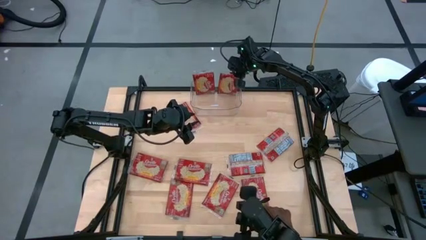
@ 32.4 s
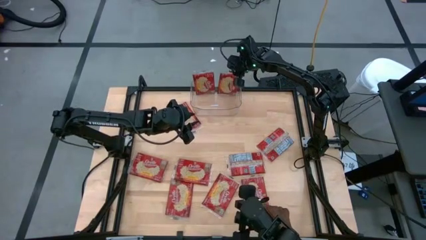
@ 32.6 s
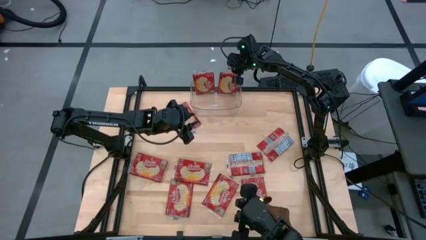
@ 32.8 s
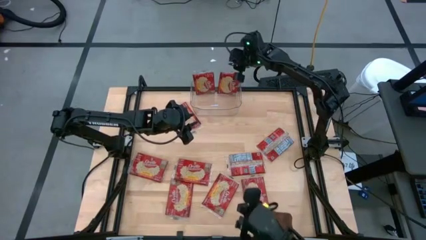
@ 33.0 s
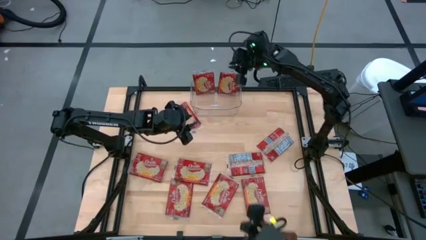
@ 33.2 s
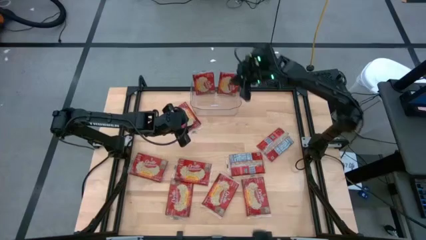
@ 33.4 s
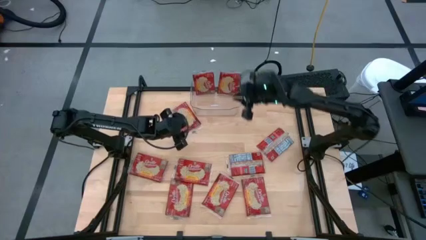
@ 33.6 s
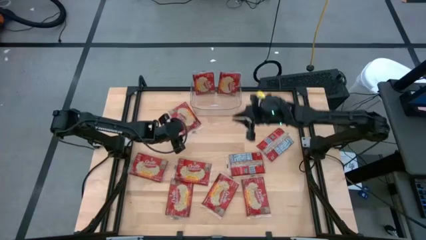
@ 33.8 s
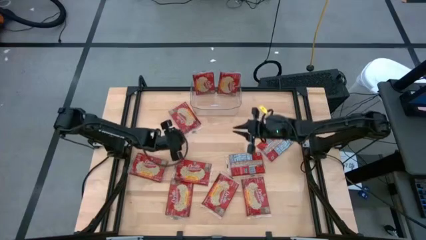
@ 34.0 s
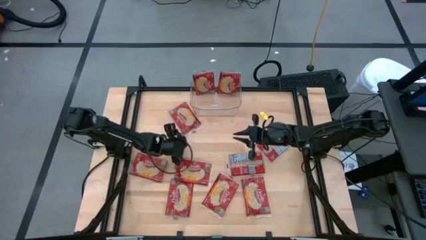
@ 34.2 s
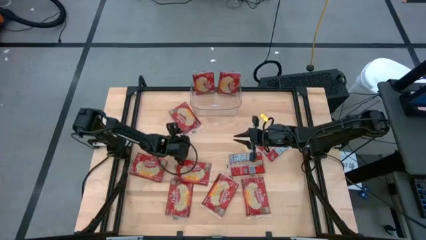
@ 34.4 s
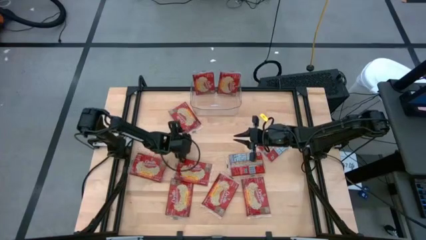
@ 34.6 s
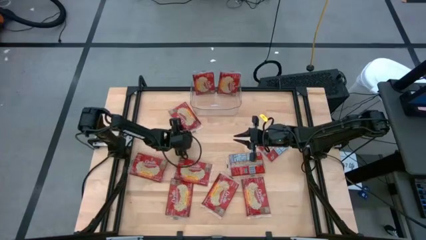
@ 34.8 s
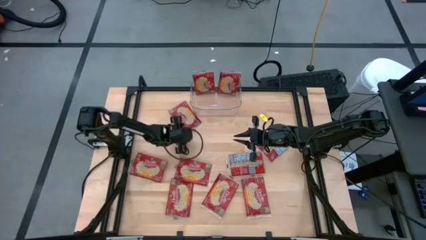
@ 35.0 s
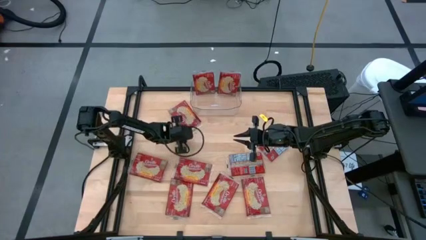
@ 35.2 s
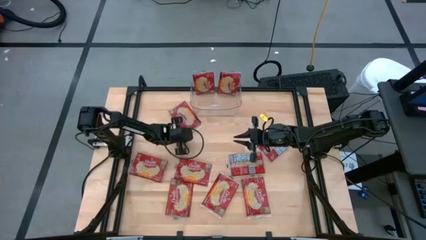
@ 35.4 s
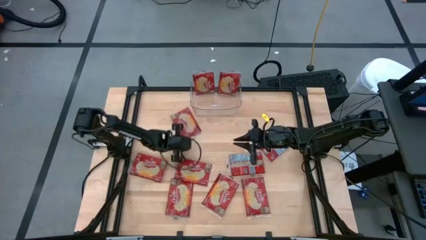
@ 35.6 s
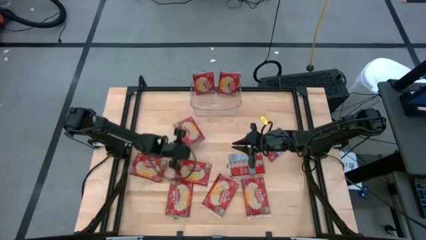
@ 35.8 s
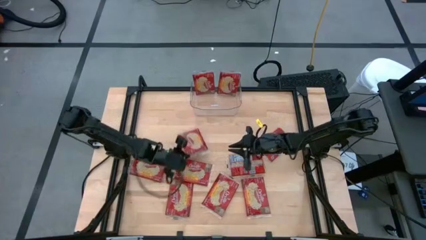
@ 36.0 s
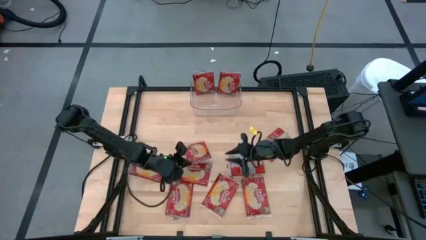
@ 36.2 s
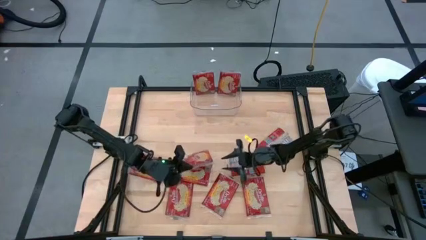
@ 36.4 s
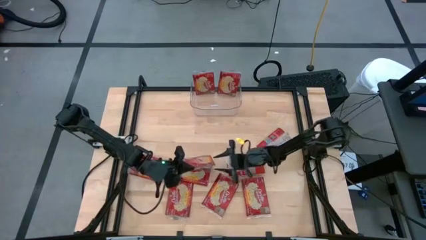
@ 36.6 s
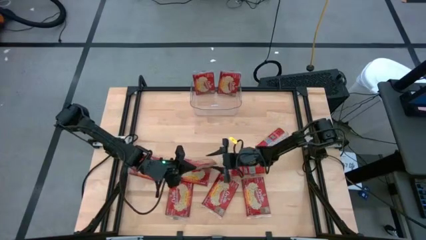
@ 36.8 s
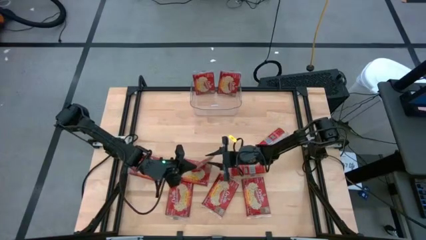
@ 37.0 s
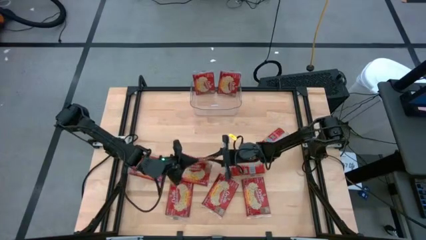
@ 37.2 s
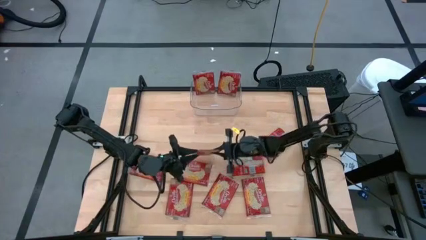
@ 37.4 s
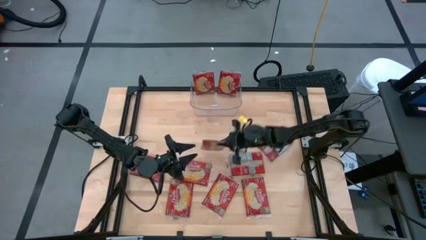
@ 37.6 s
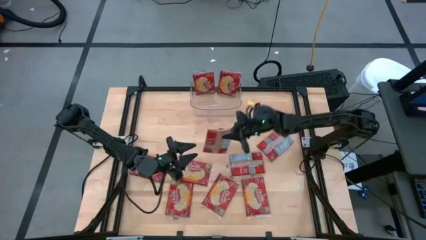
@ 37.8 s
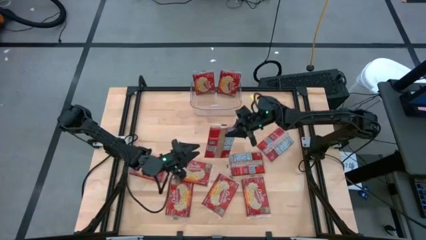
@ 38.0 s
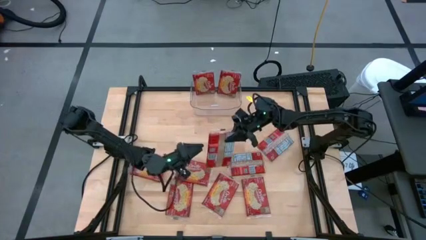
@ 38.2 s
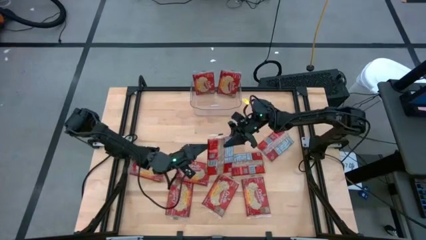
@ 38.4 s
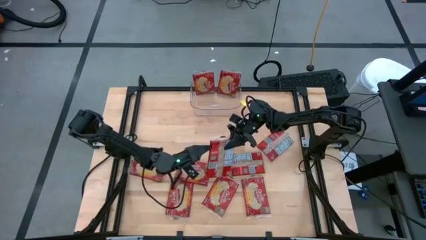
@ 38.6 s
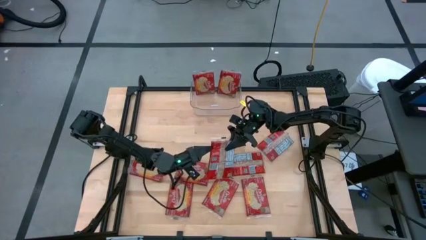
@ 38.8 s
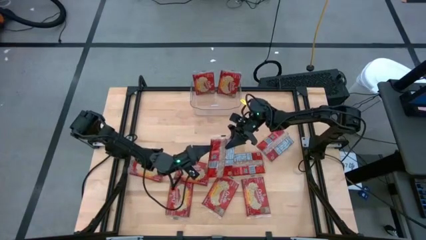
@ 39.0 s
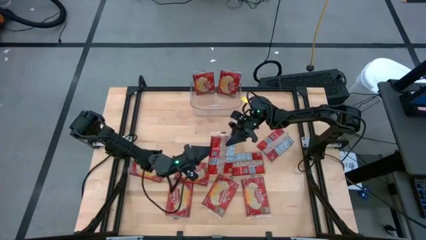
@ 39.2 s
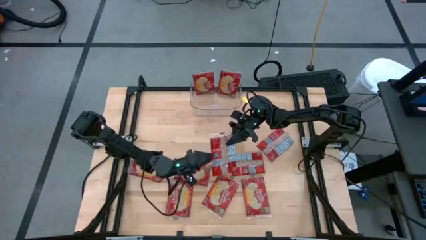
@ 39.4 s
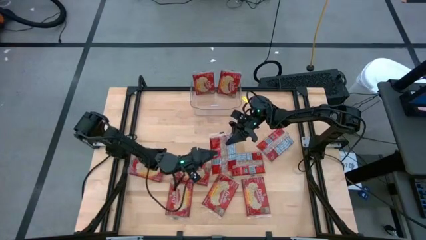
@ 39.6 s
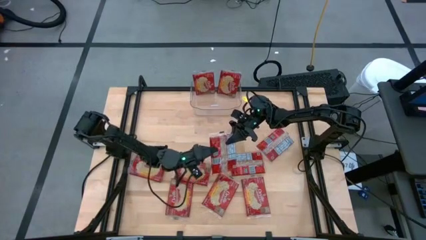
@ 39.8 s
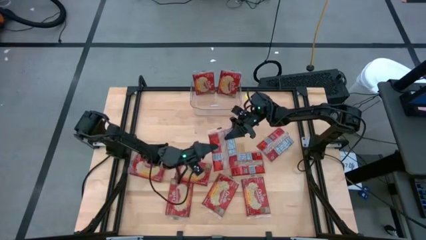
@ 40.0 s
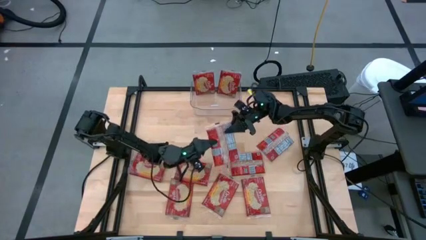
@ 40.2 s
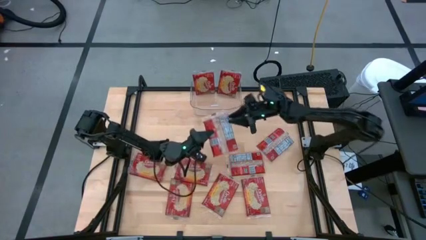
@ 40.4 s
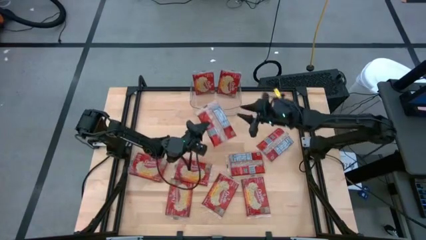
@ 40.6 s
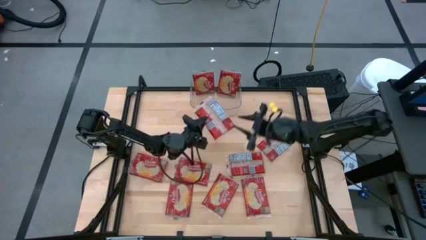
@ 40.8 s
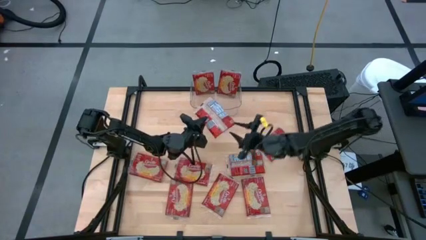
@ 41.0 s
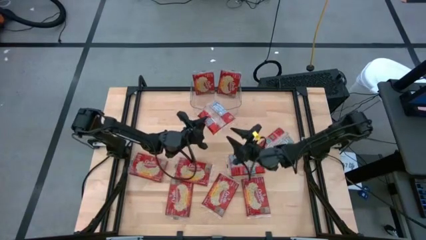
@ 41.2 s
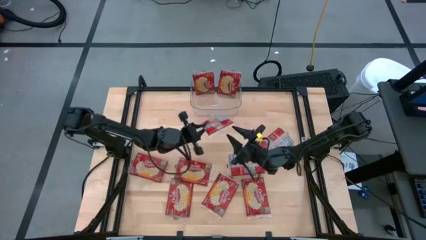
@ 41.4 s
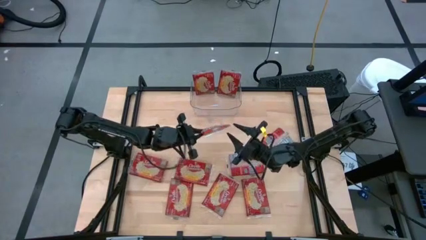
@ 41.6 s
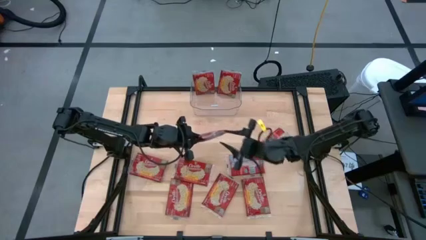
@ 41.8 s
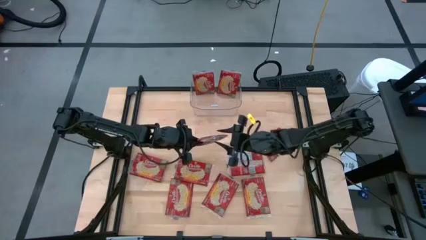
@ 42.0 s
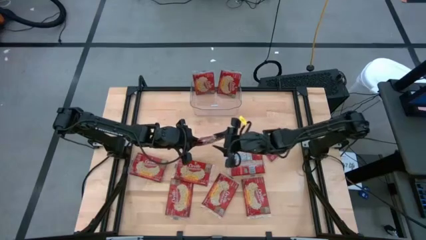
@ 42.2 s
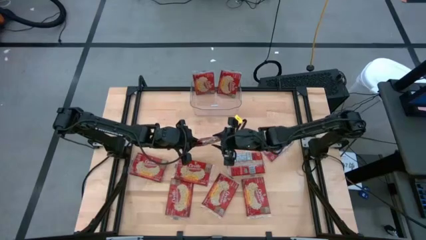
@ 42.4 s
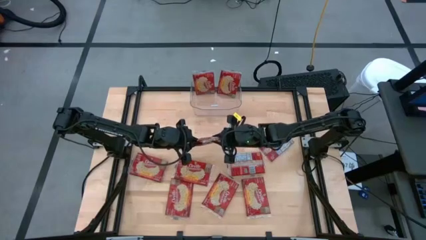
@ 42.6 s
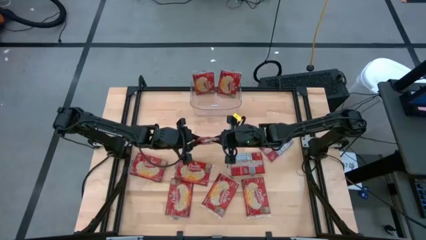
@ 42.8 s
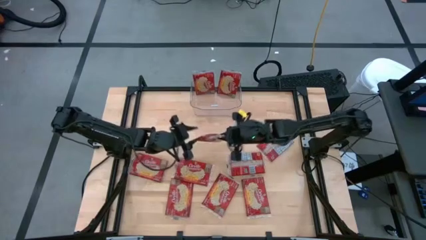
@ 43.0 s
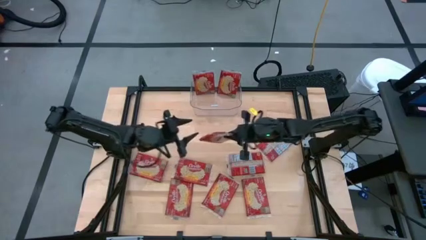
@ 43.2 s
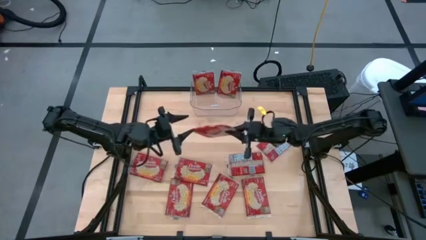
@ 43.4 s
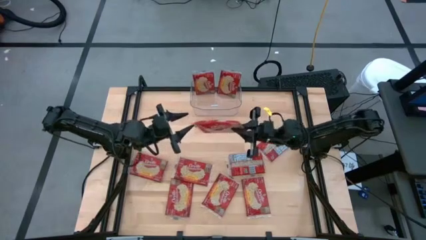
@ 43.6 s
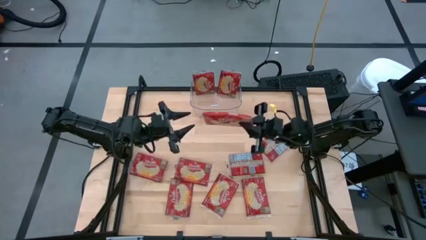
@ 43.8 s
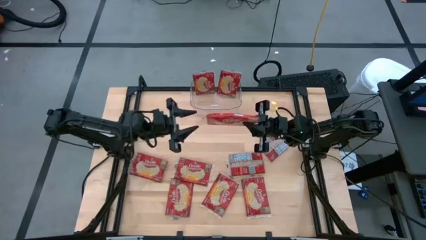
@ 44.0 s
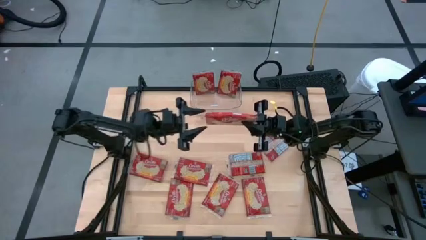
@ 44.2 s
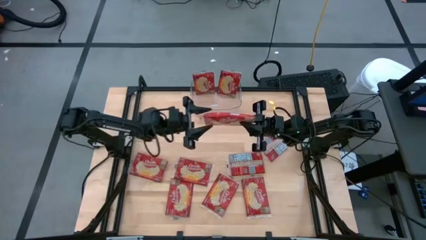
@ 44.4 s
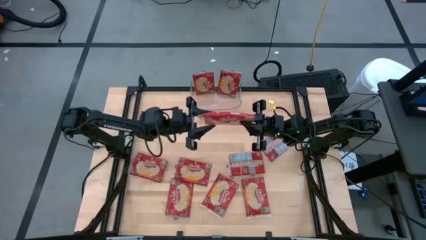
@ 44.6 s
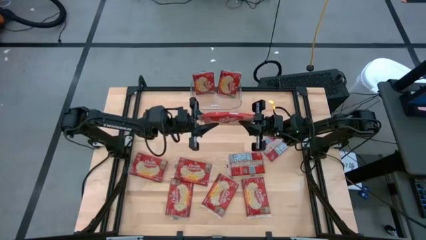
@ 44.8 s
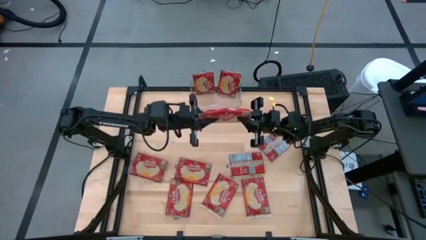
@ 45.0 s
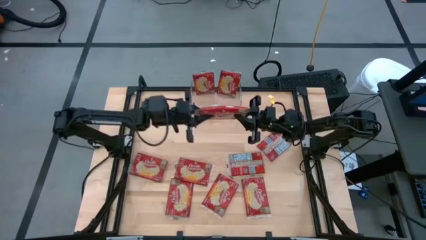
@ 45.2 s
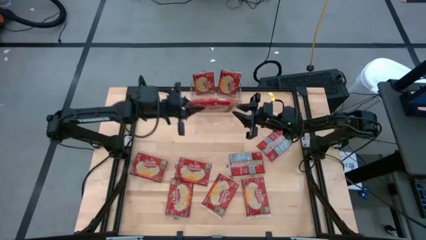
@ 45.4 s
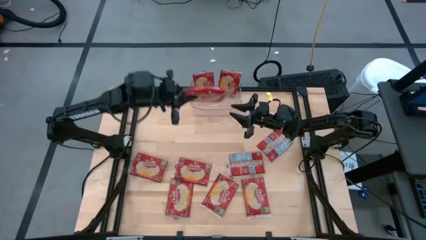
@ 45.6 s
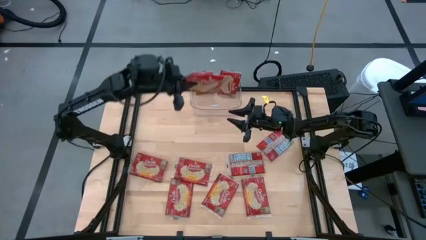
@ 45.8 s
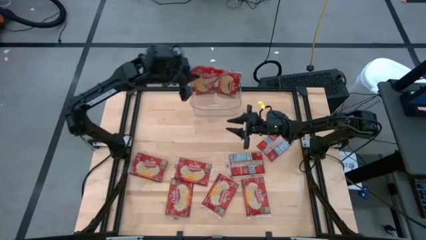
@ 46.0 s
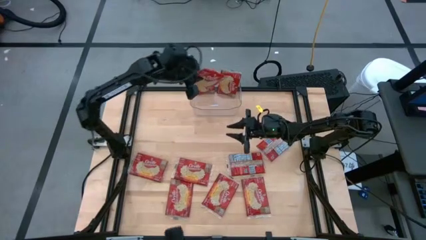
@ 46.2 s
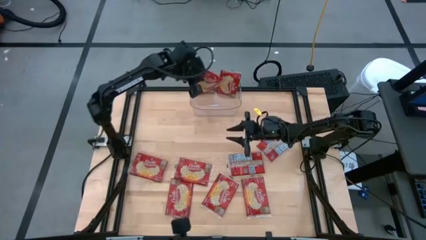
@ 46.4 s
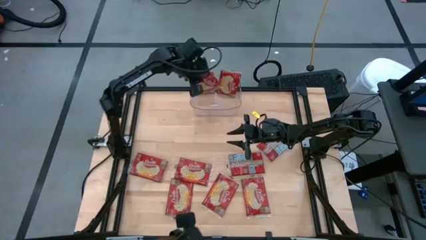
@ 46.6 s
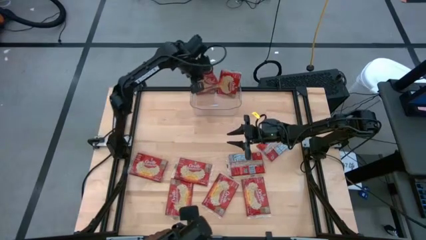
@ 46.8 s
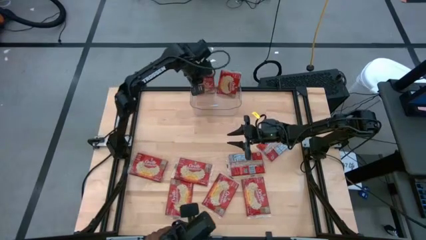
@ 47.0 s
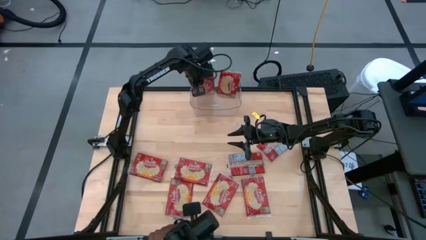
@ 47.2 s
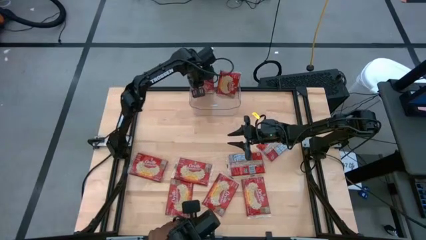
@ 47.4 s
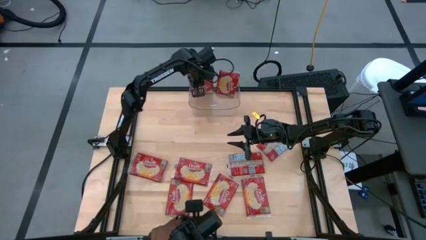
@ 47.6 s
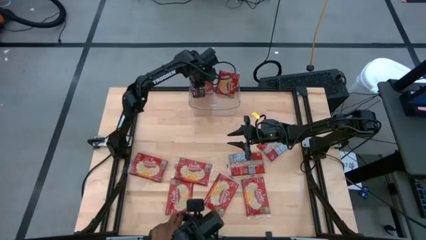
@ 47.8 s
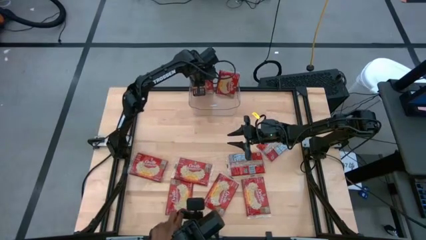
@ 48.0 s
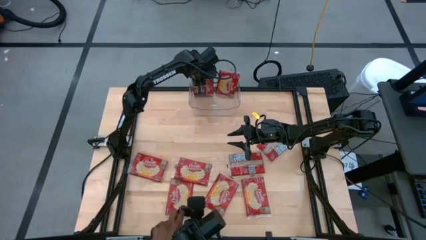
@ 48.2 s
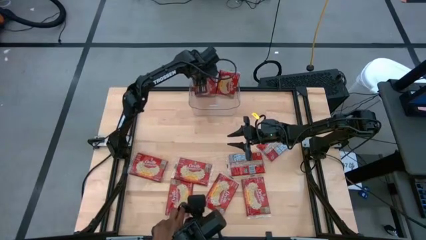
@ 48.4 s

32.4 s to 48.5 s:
Task: Sort popcorn bags into baskets
Put the red popcorn bag into the transparent bin
